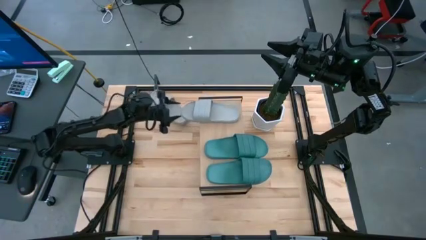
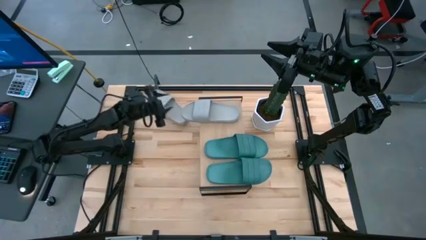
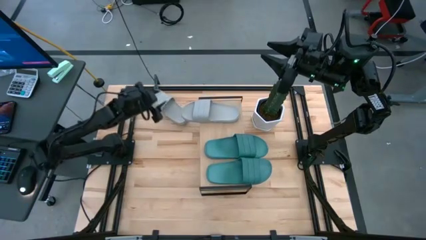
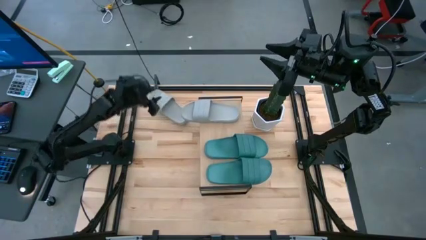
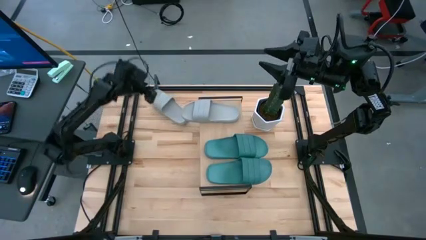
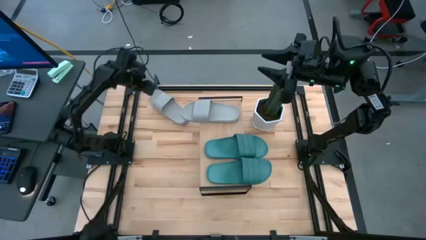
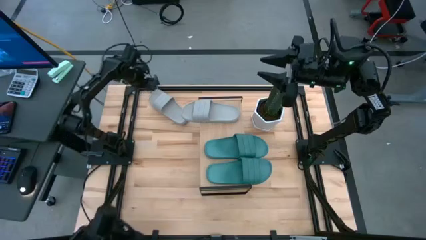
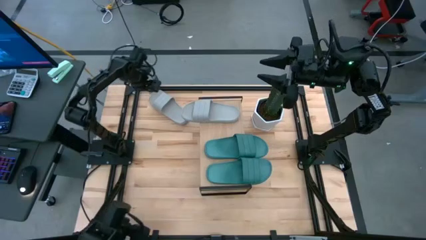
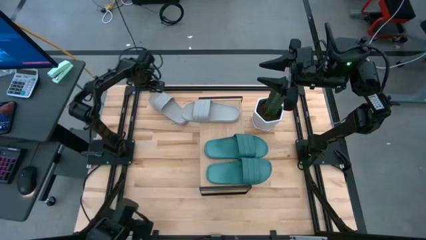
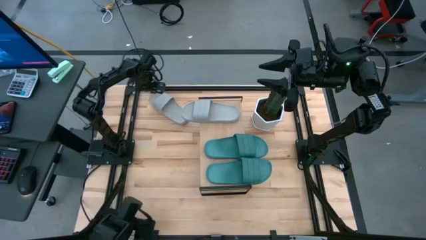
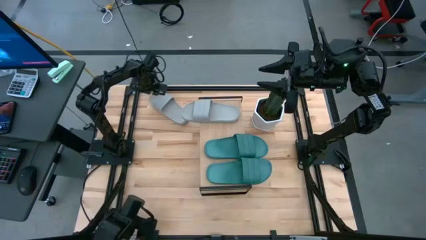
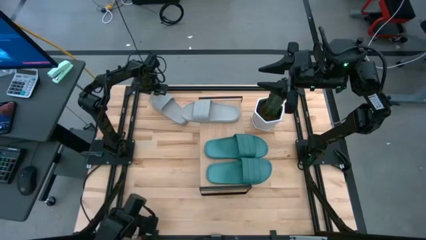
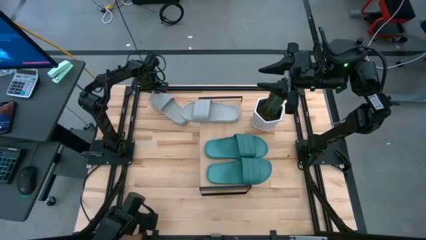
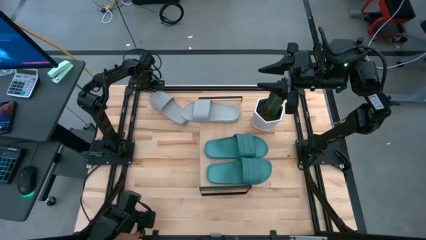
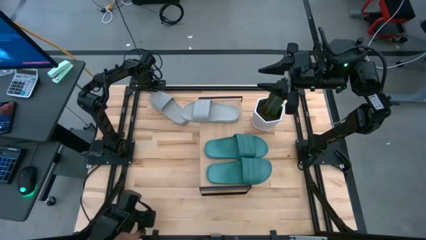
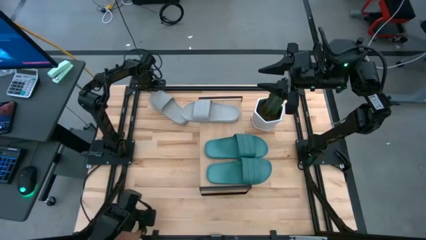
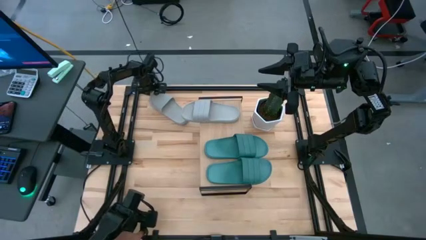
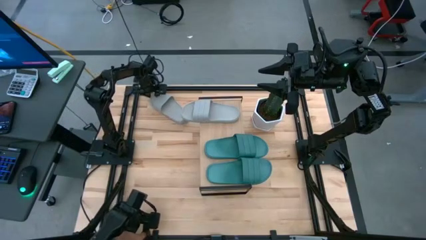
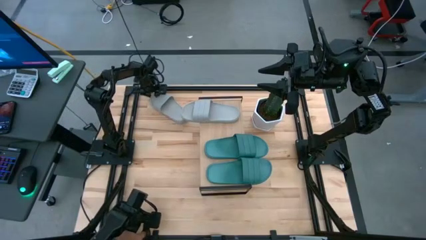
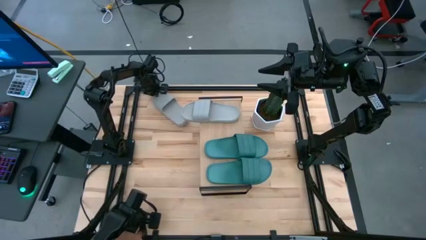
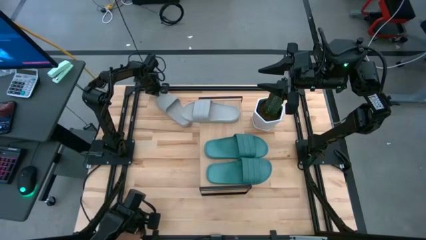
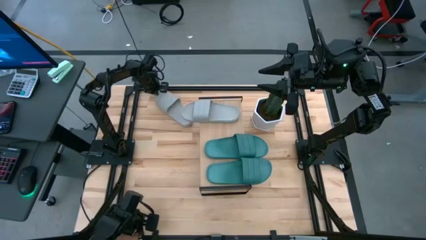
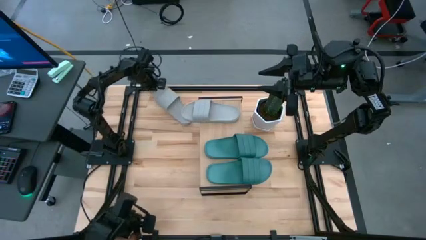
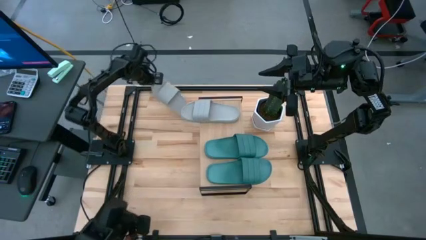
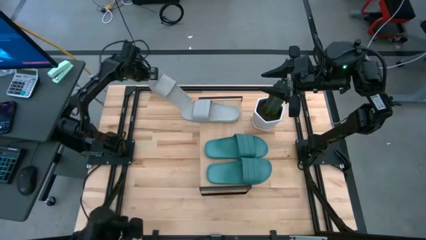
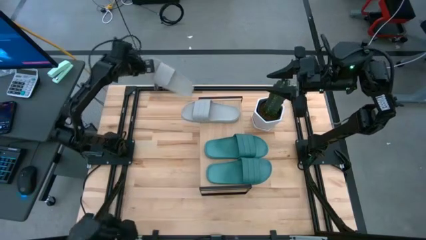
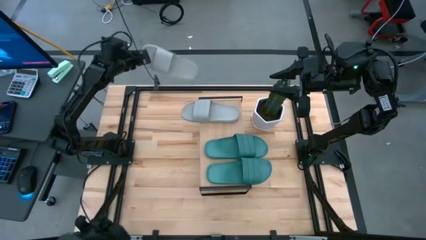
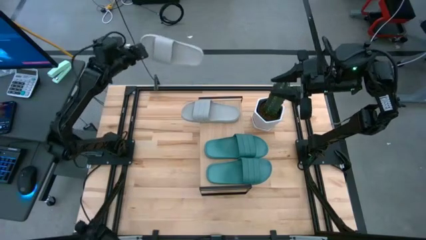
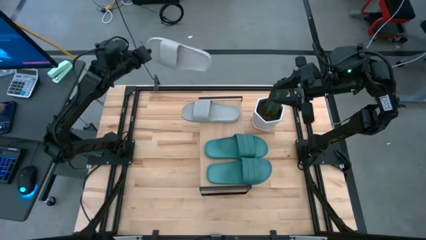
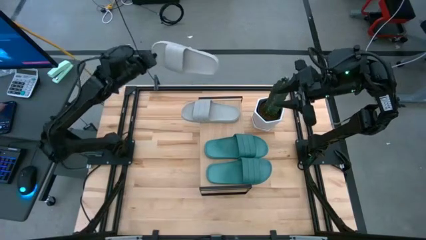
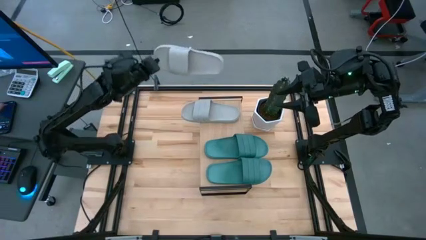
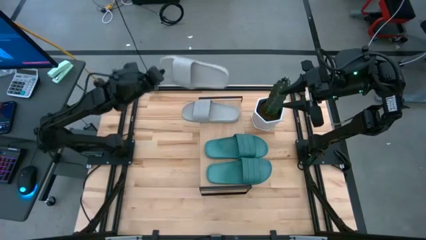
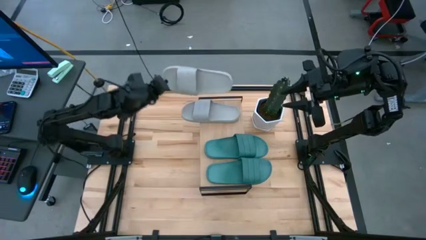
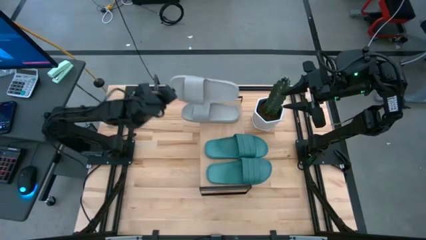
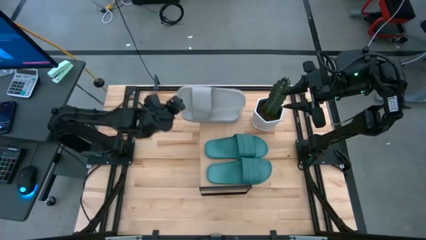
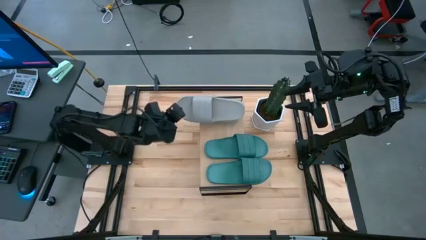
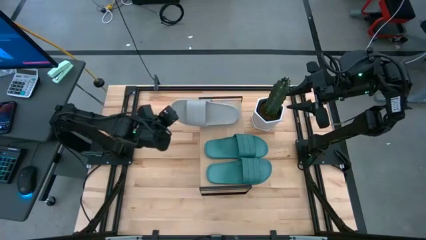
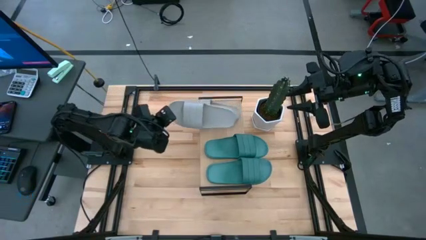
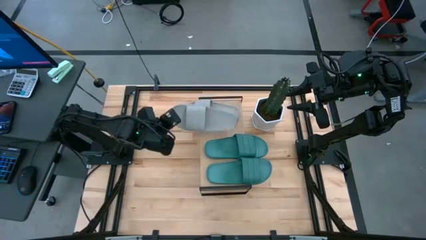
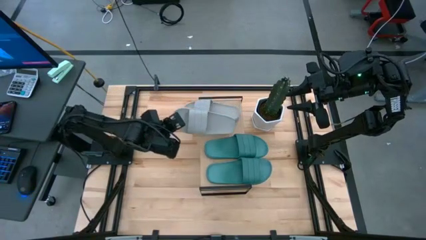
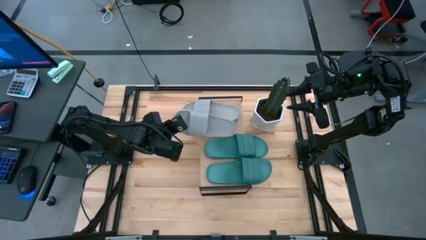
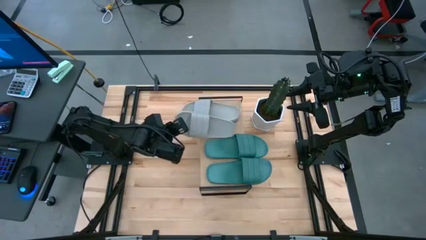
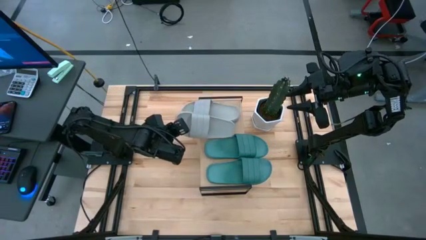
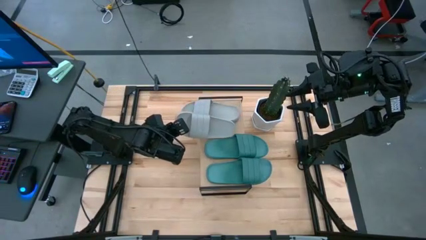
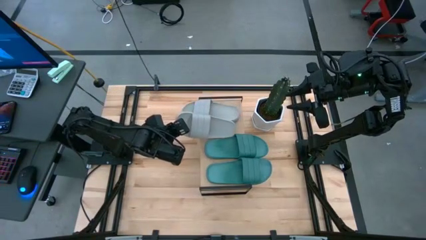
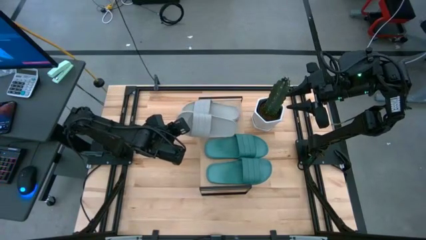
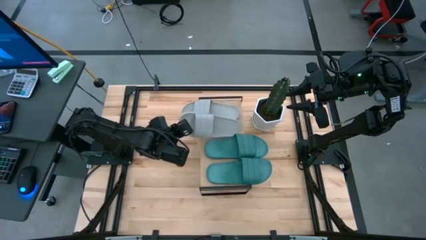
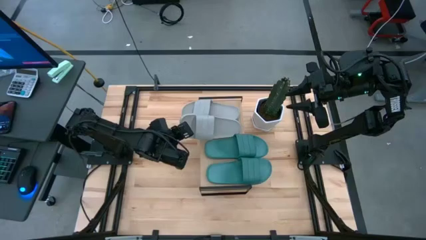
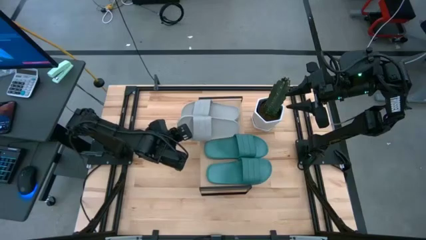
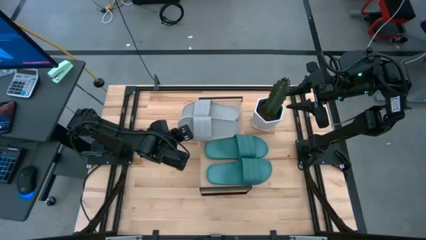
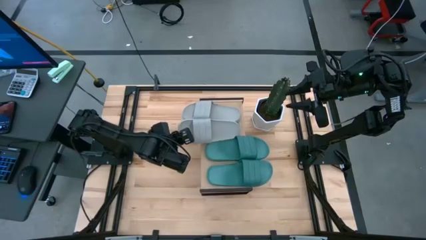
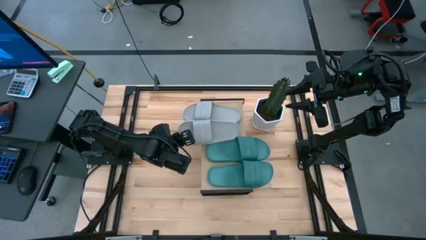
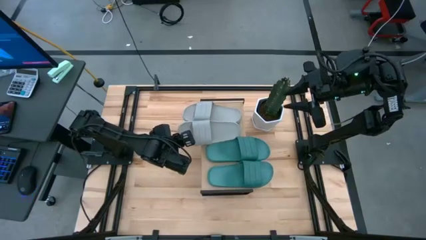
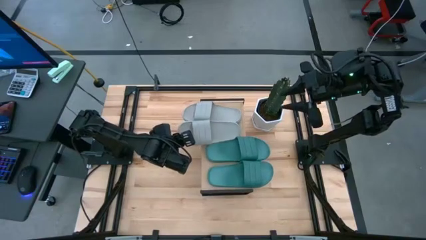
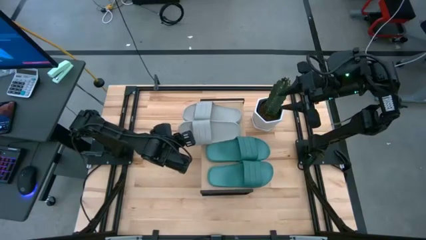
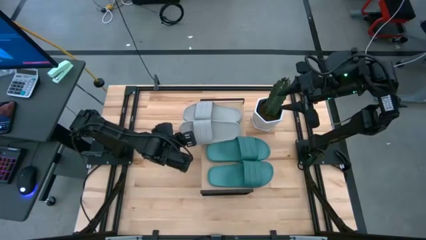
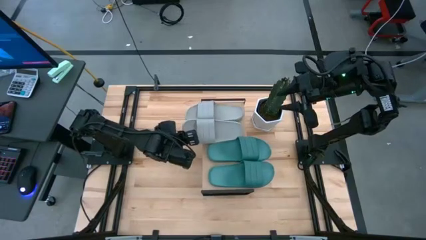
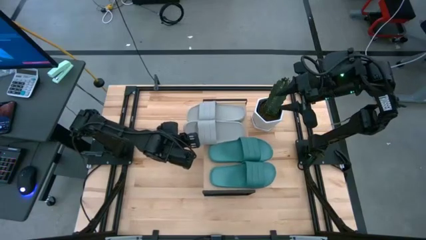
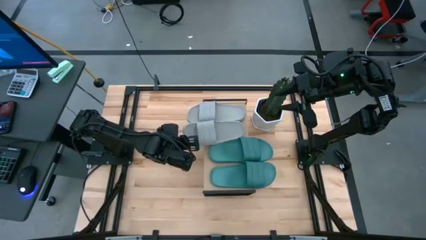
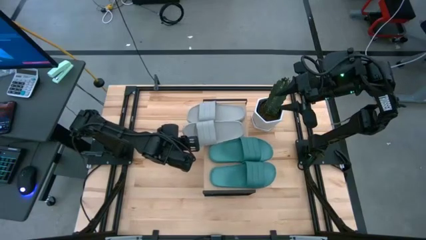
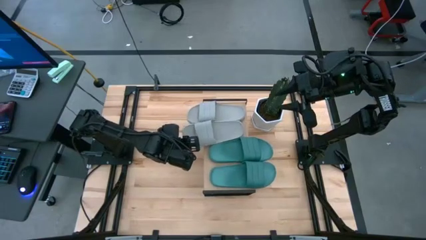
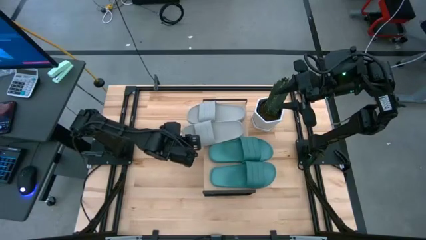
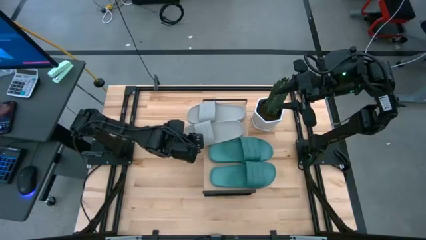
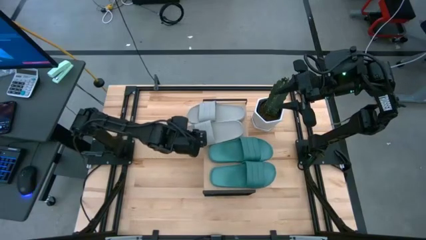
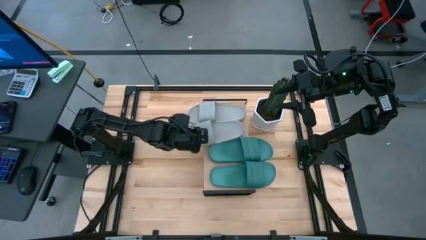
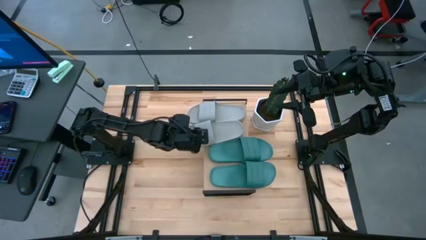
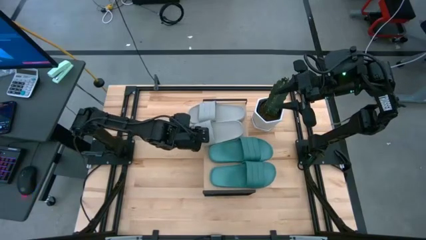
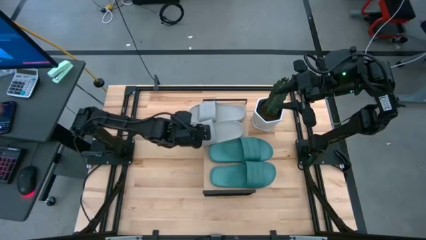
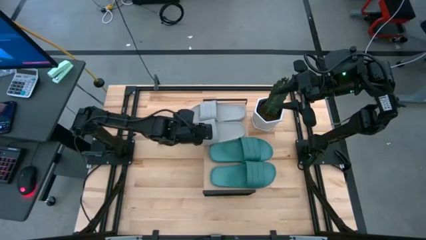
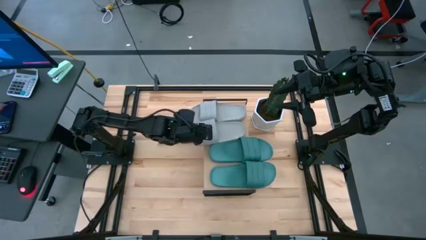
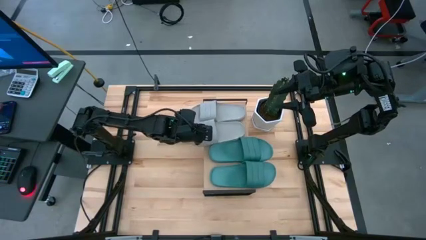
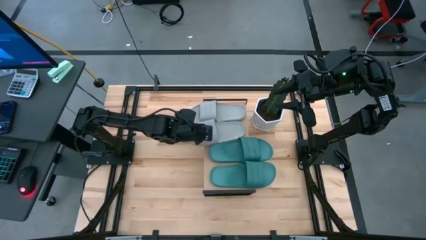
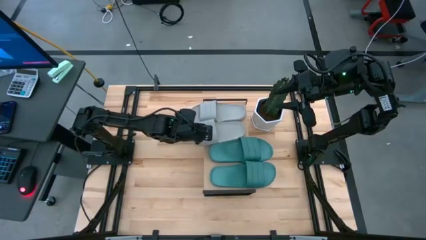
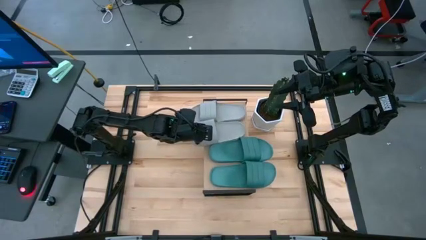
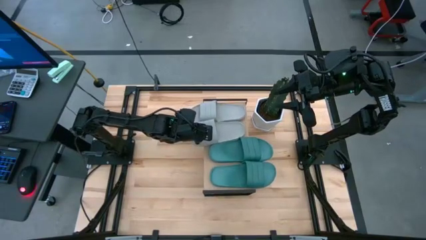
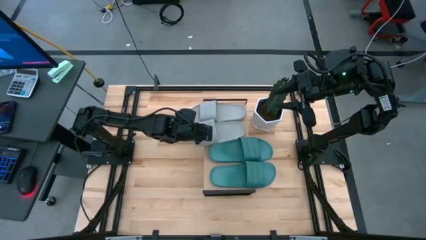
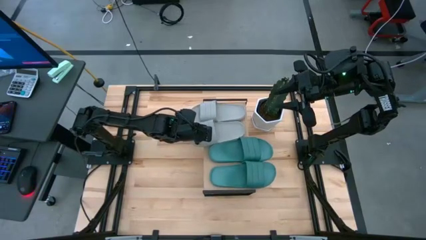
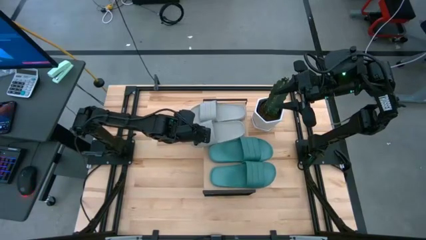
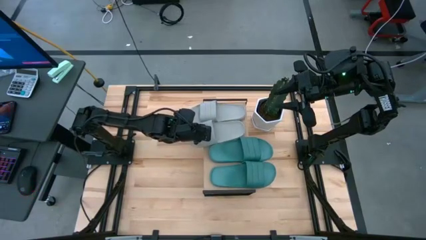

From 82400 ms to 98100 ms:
Task: Pick and place slides into the shelf
Put the gray slide on the shelf
